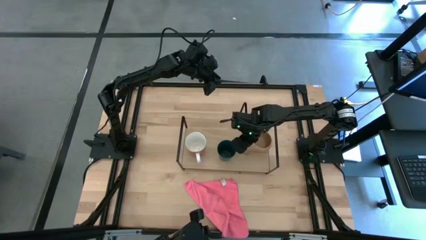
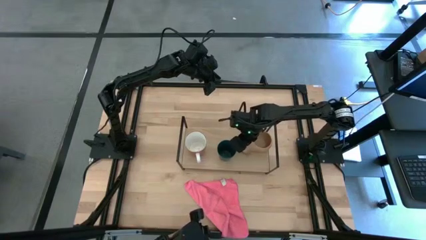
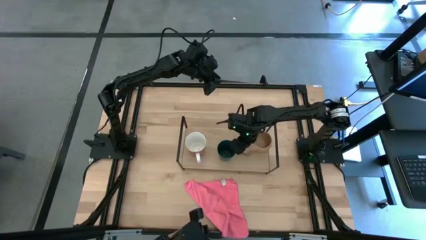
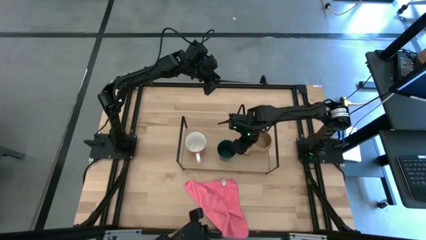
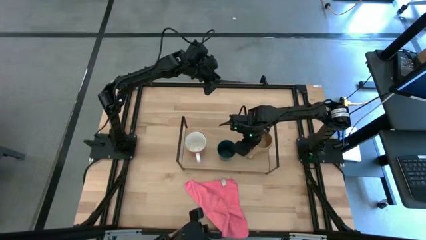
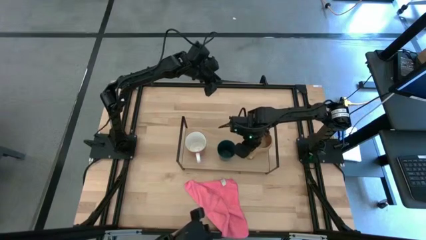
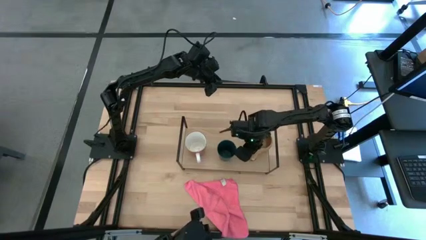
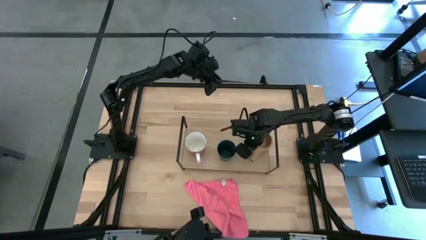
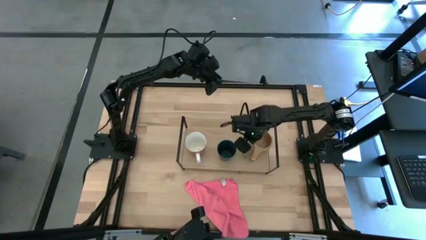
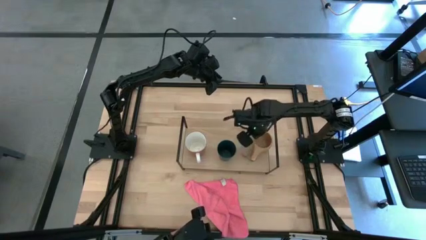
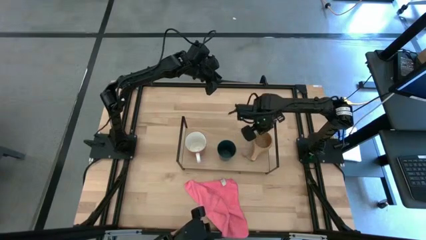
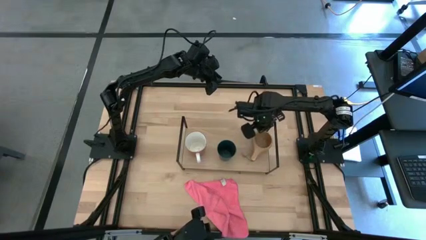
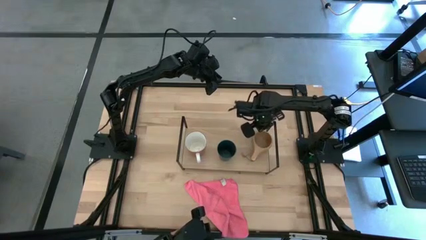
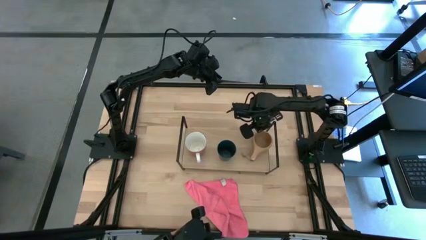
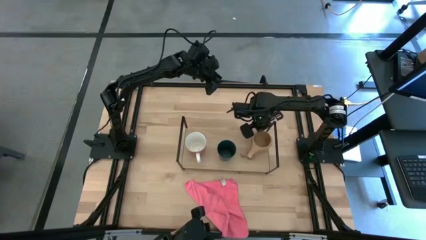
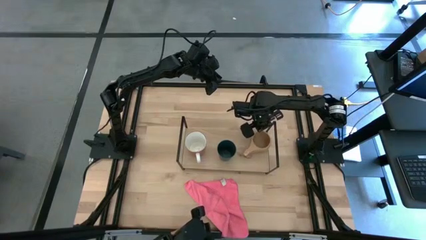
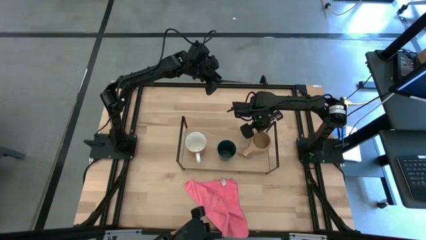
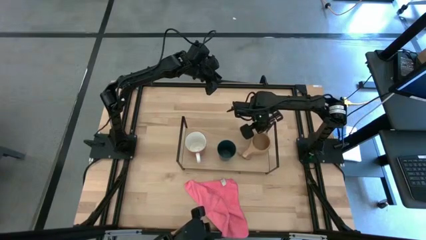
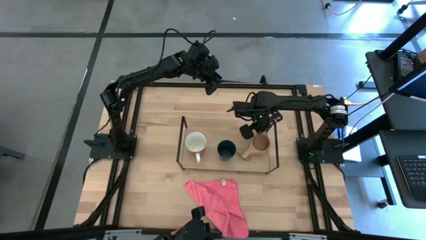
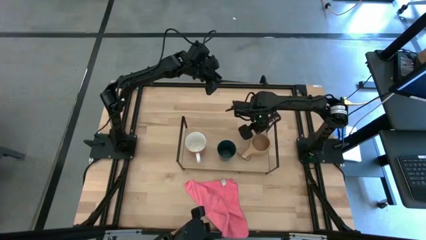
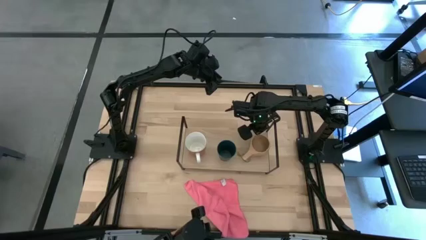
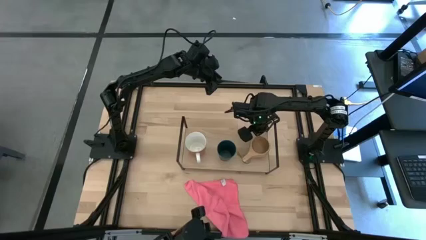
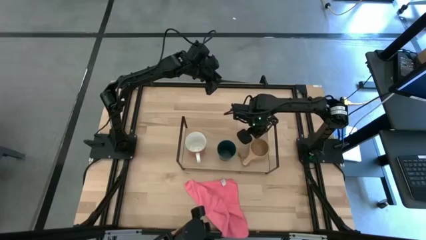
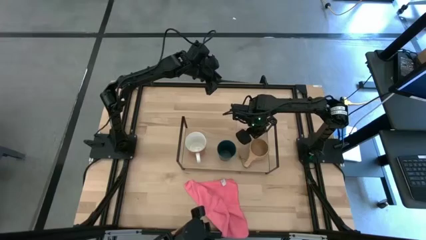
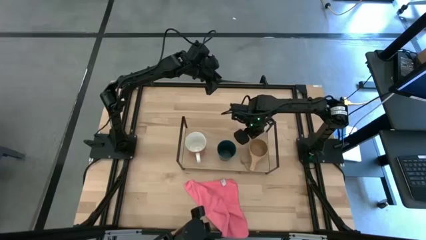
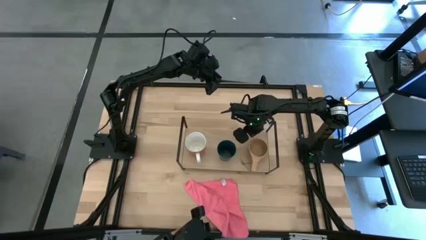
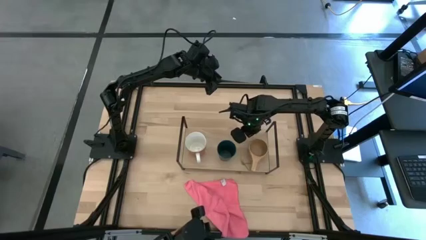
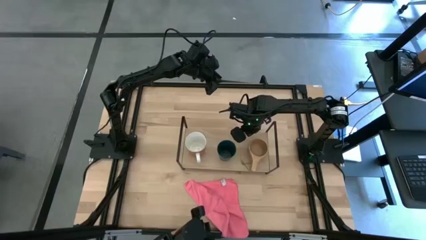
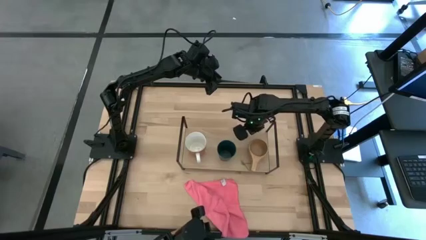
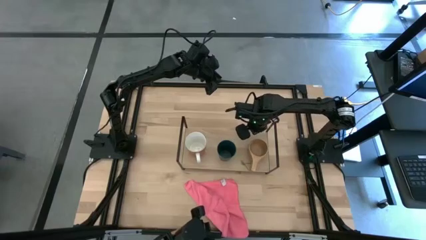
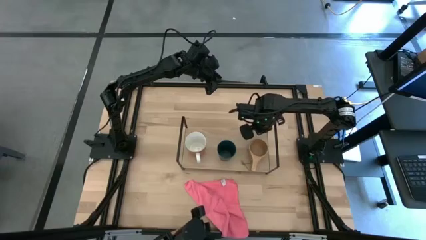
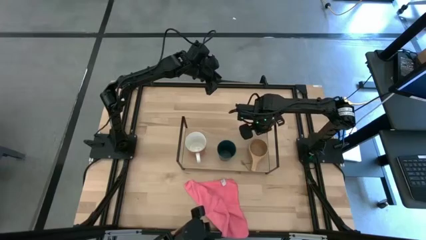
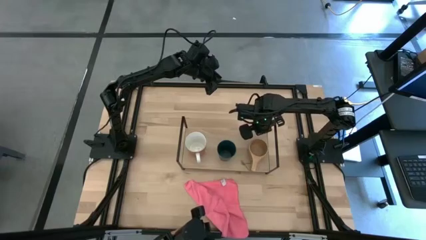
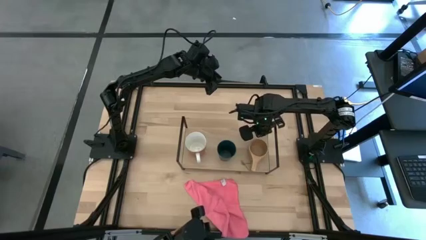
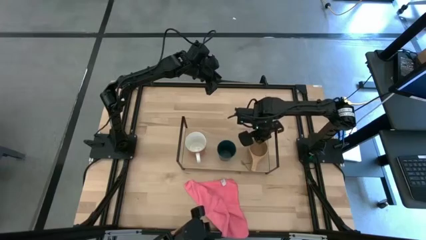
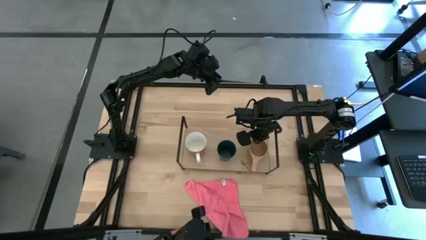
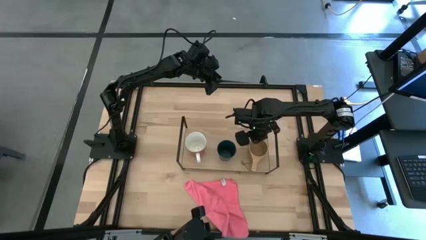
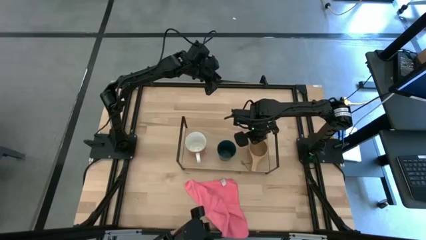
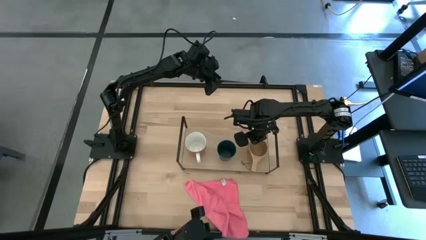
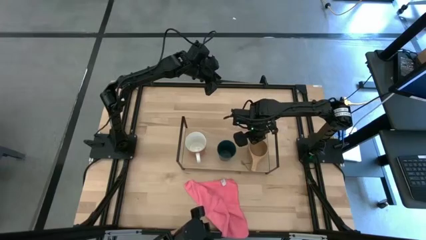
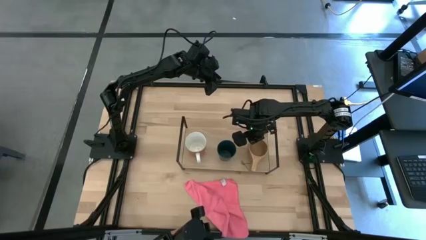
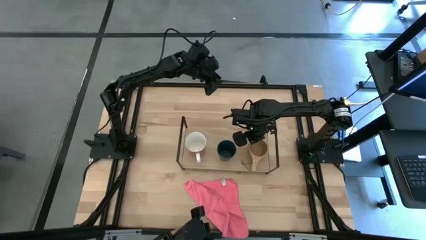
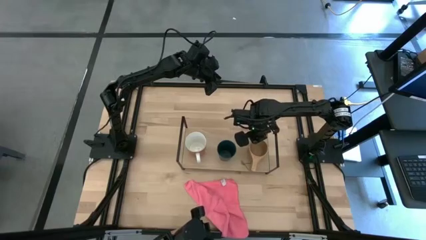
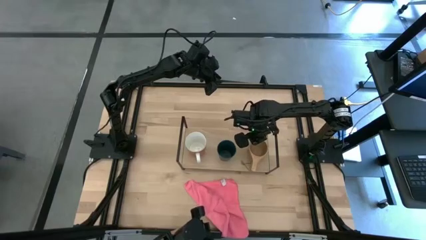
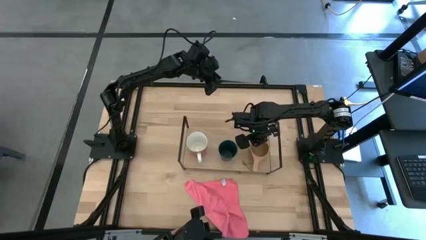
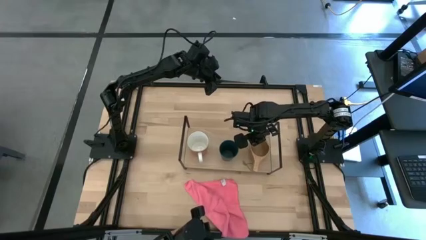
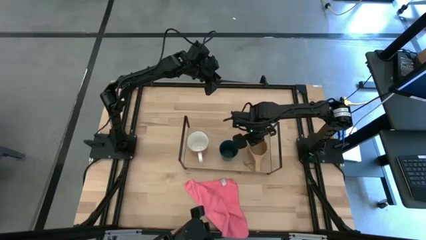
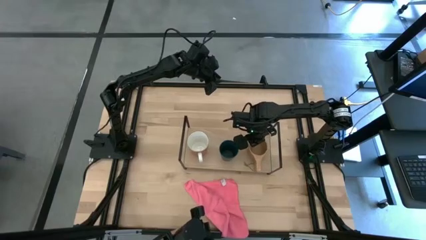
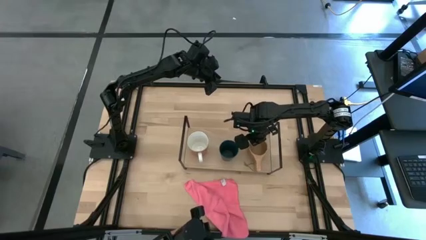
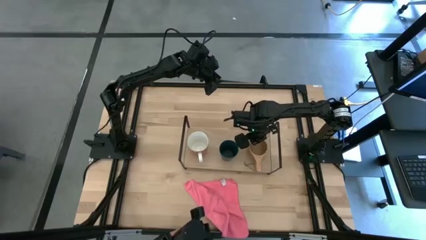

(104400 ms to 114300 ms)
Task: Stack small to large cups/mugs on shelf
Put wooden mug on the shelf

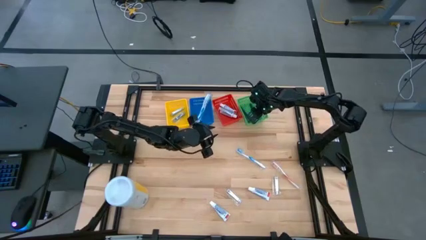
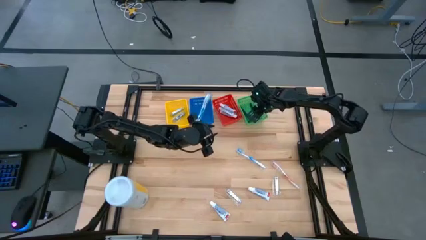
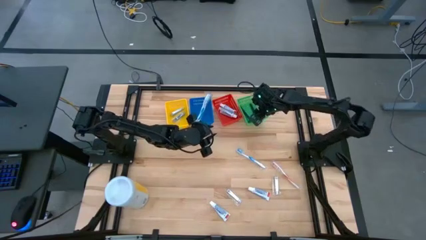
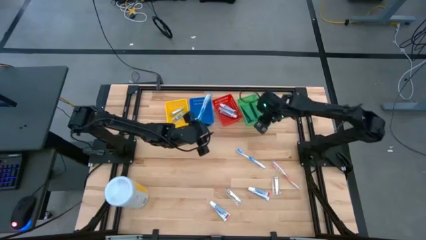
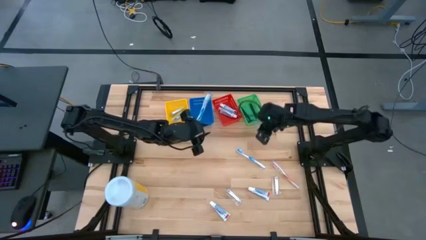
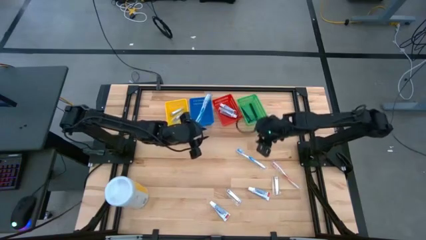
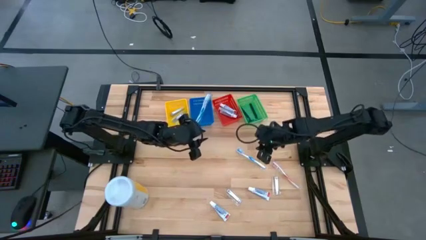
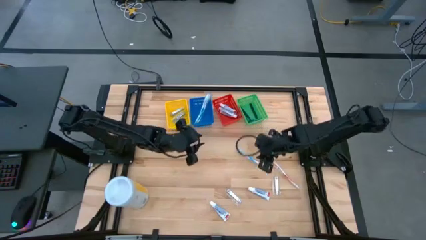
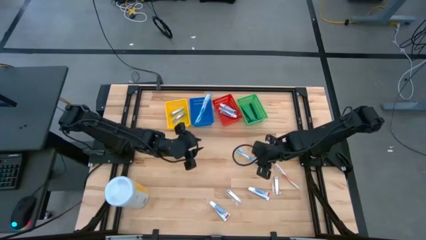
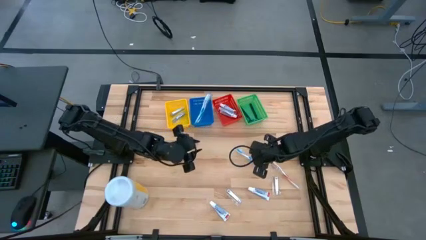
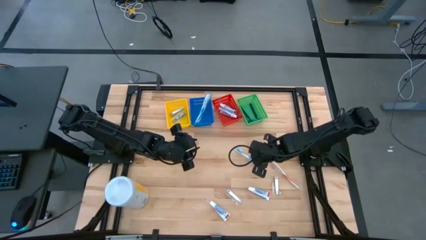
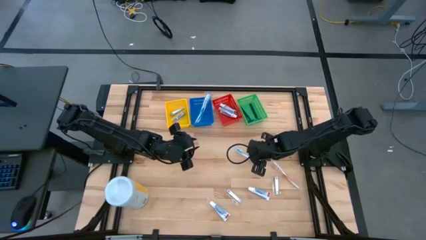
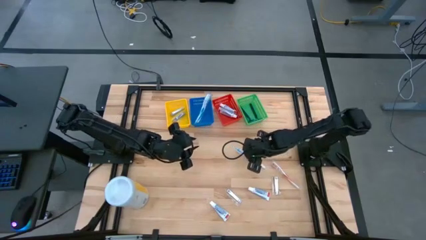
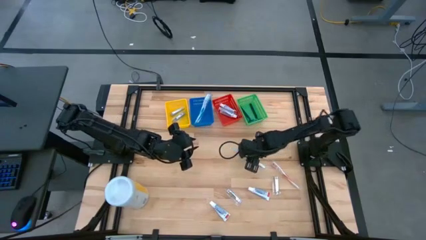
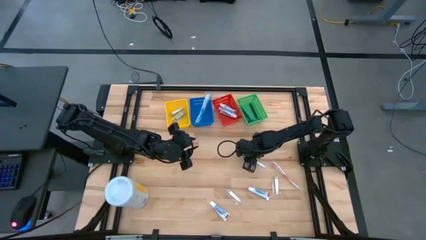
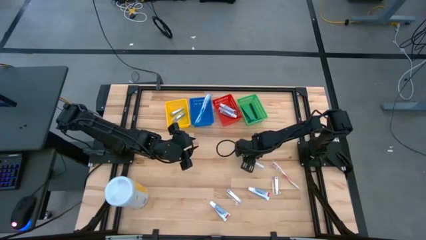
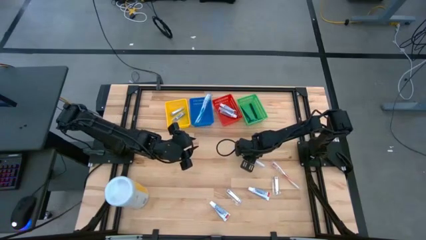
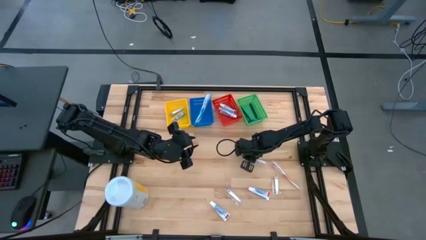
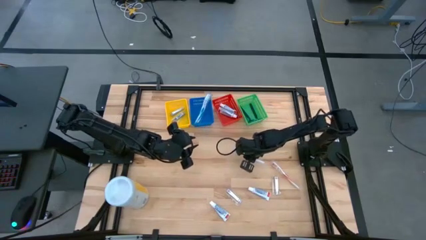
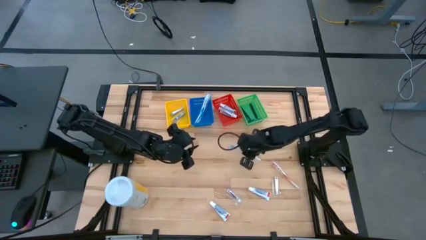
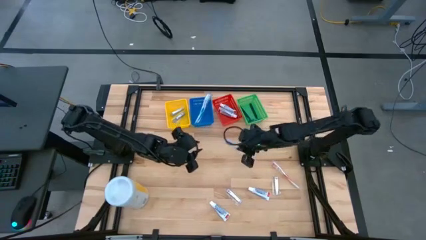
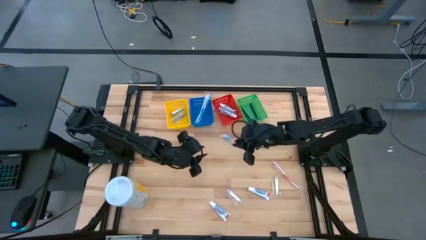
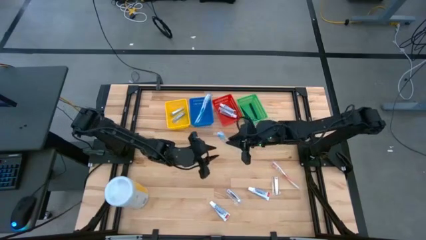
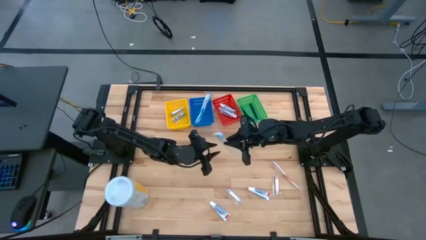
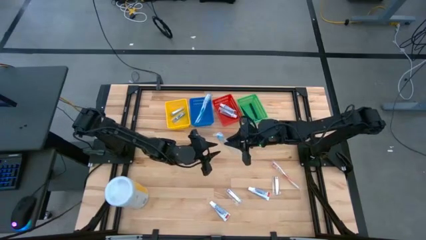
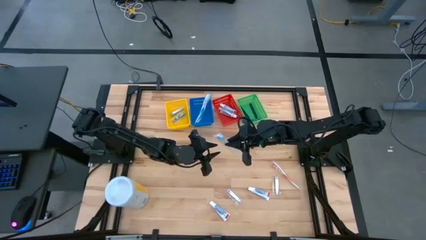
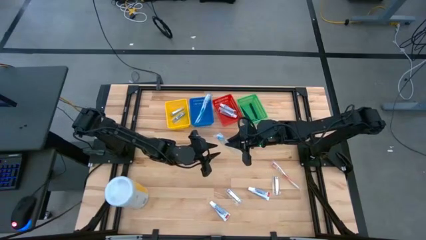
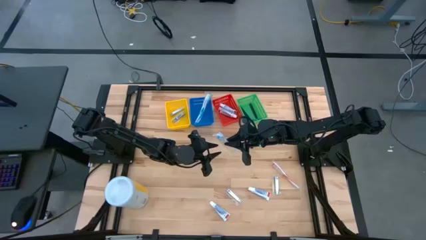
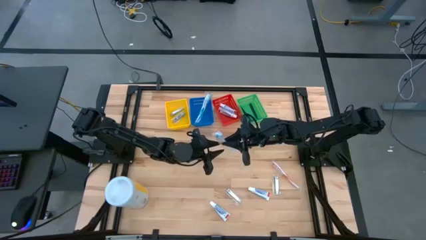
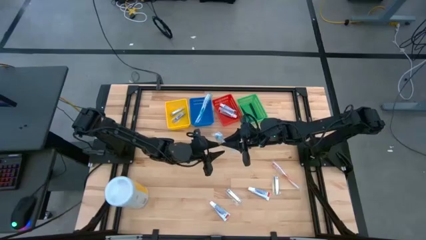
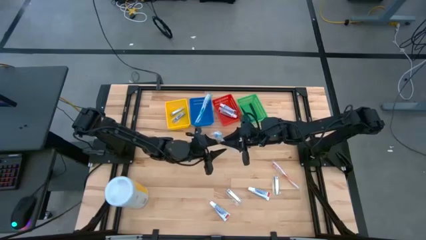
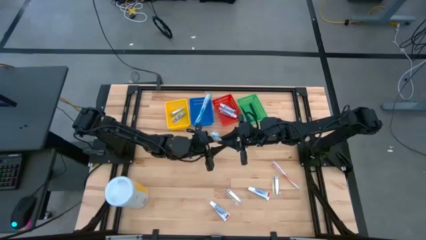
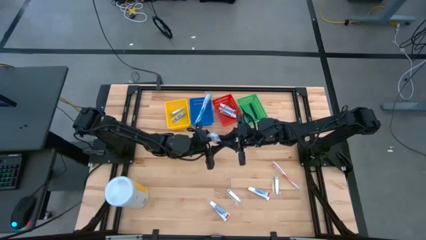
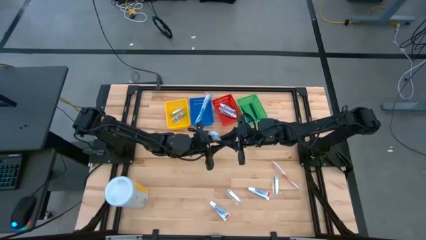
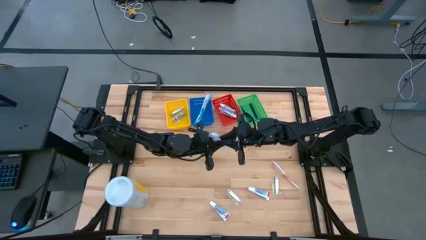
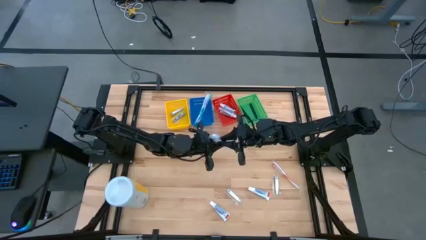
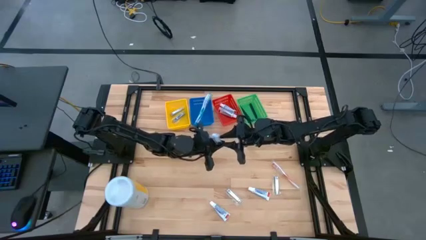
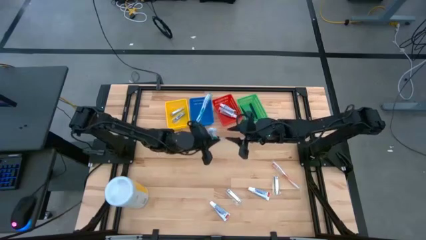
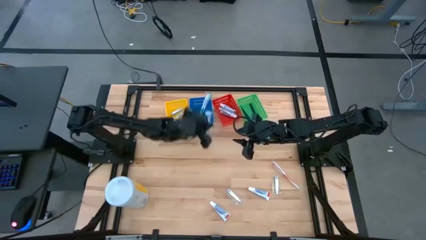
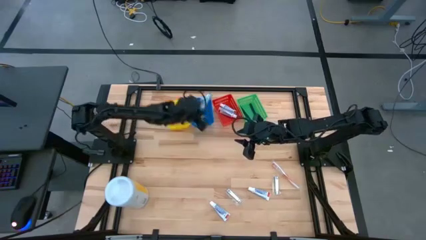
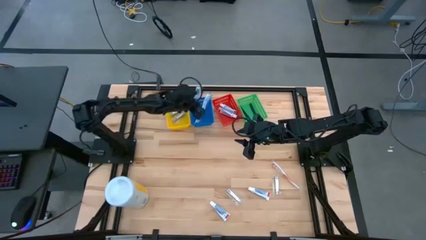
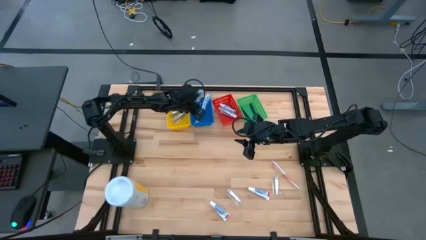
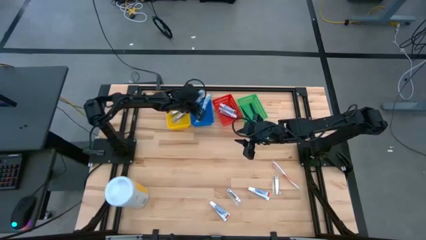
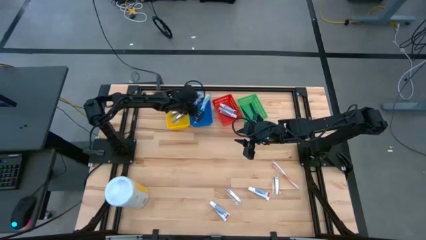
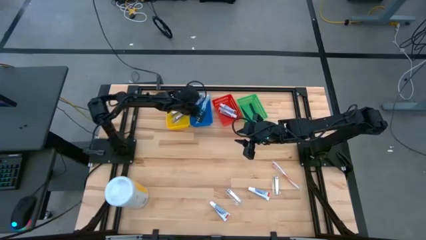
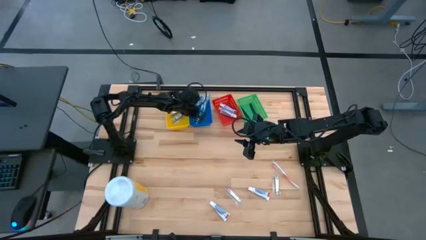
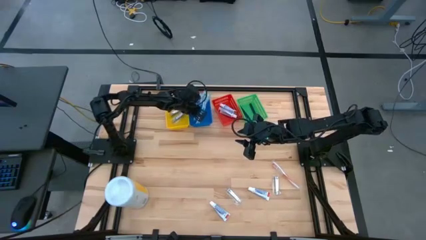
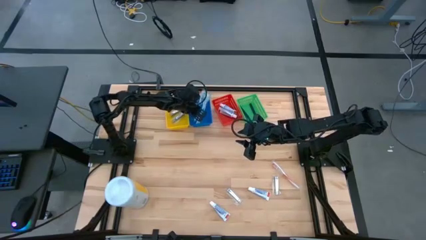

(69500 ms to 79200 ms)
Task: Pick & Place Travel size toiletries
Put the blue toothbrush into the blue bin
